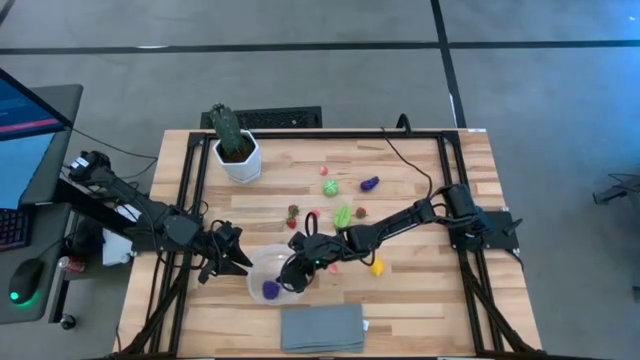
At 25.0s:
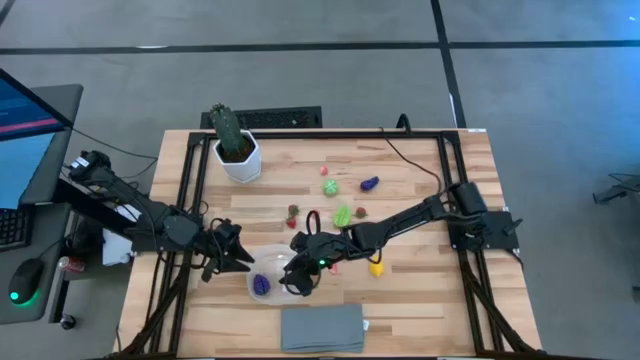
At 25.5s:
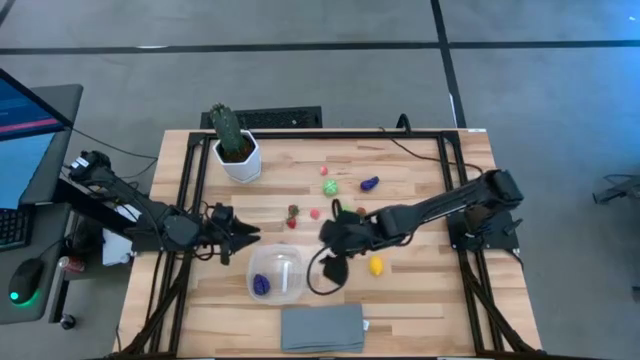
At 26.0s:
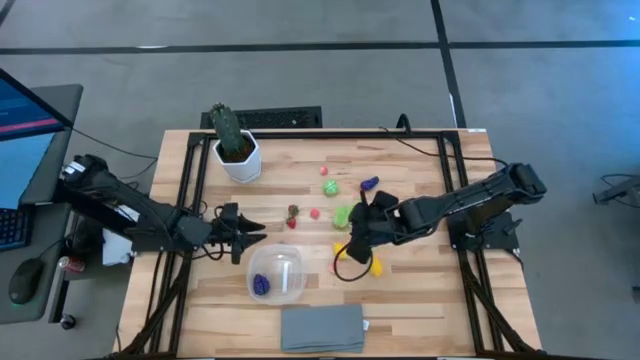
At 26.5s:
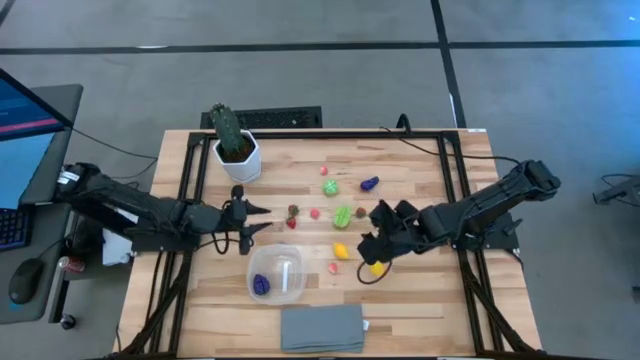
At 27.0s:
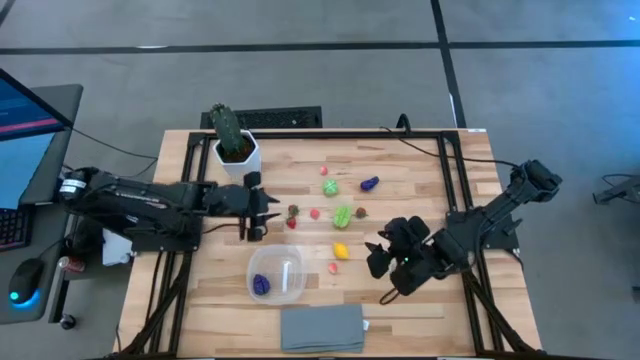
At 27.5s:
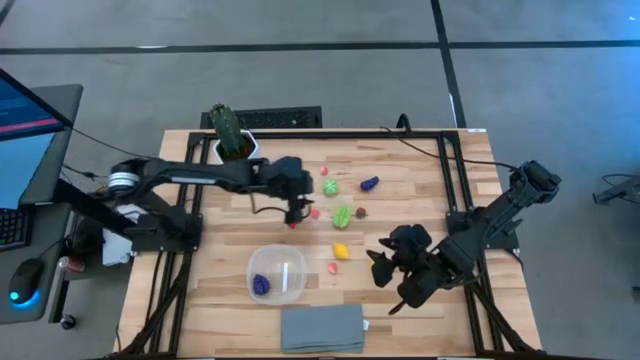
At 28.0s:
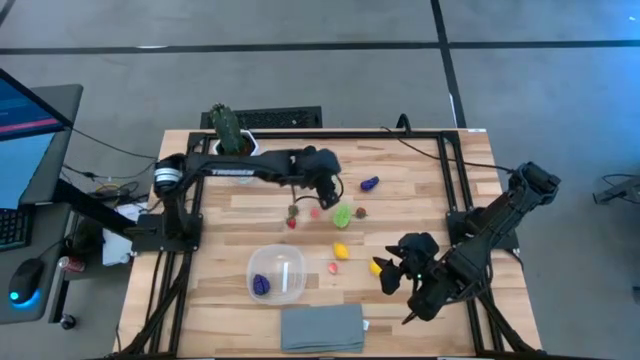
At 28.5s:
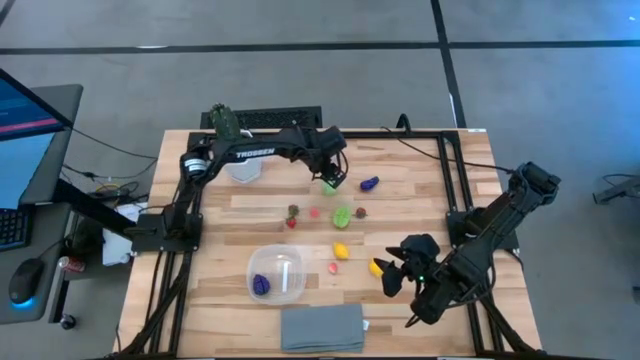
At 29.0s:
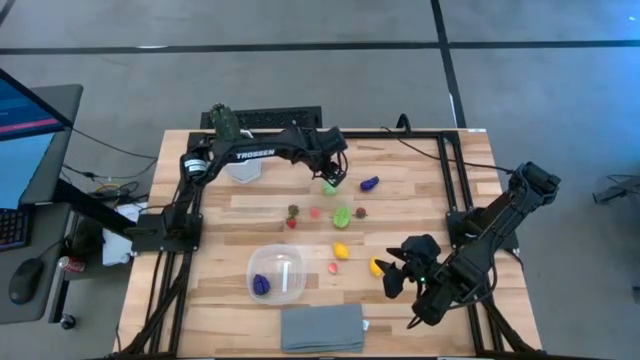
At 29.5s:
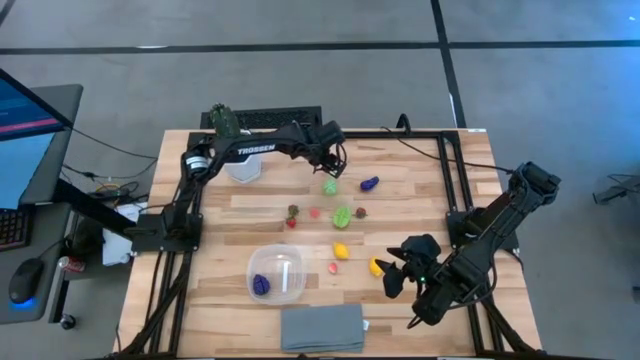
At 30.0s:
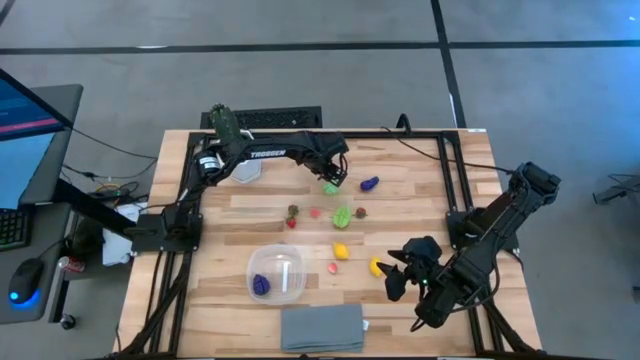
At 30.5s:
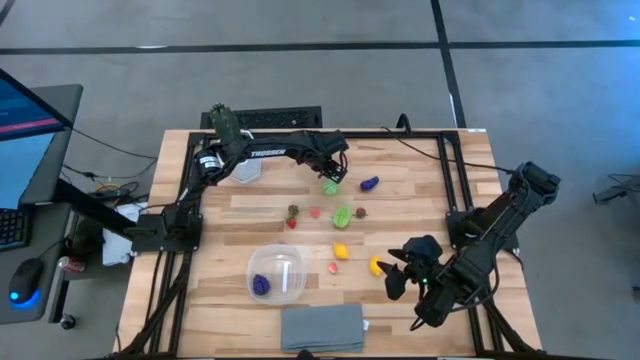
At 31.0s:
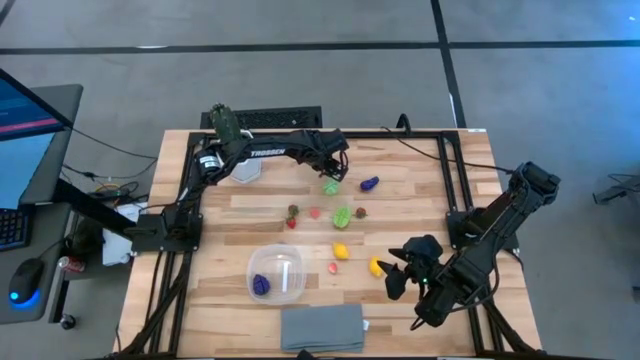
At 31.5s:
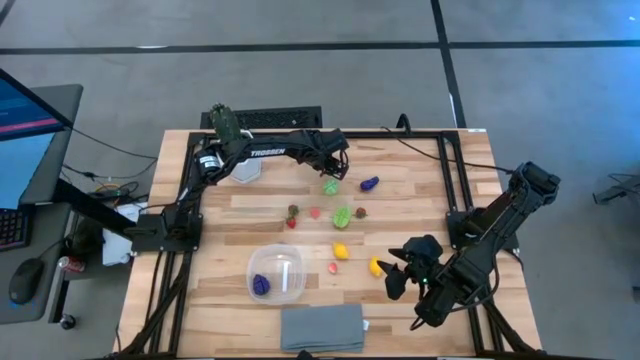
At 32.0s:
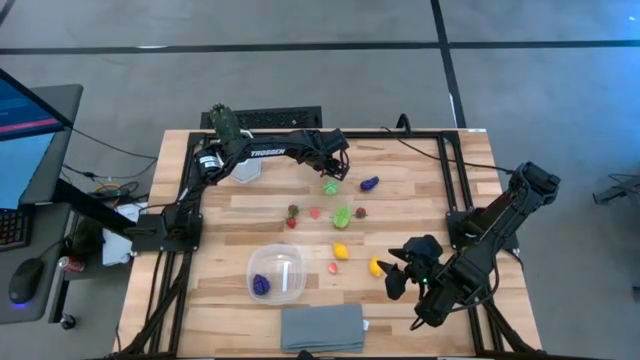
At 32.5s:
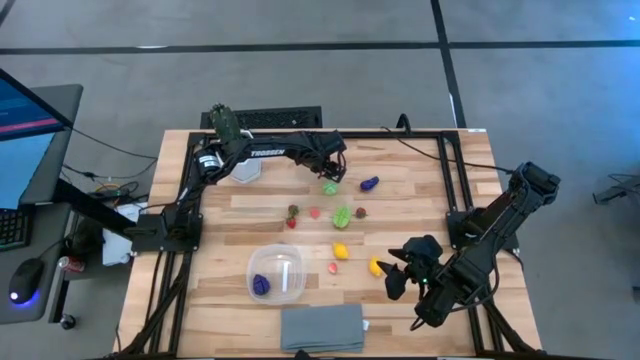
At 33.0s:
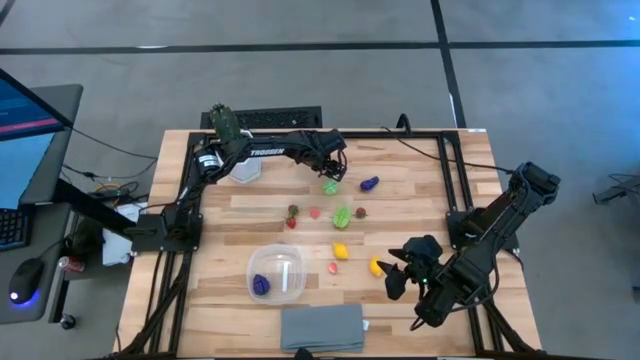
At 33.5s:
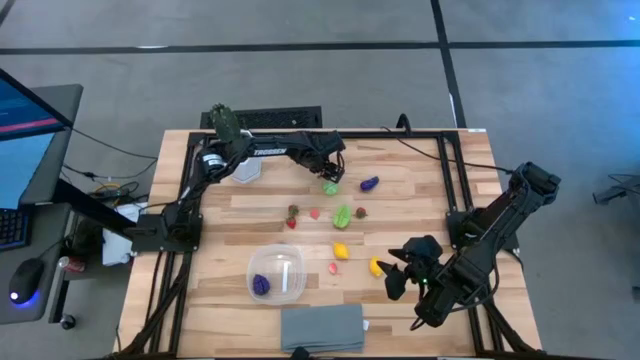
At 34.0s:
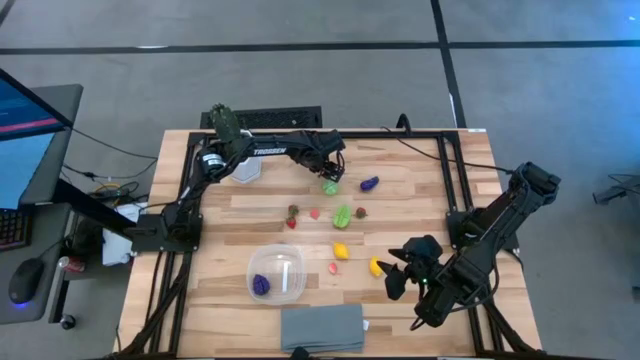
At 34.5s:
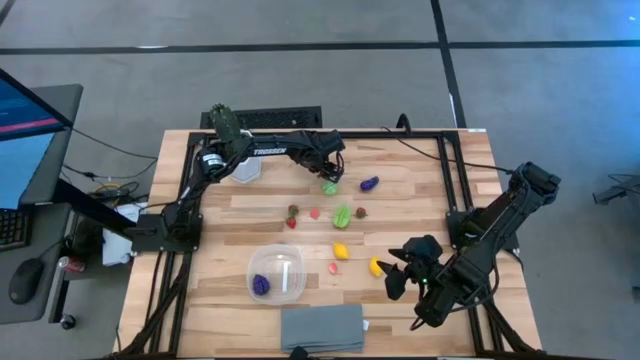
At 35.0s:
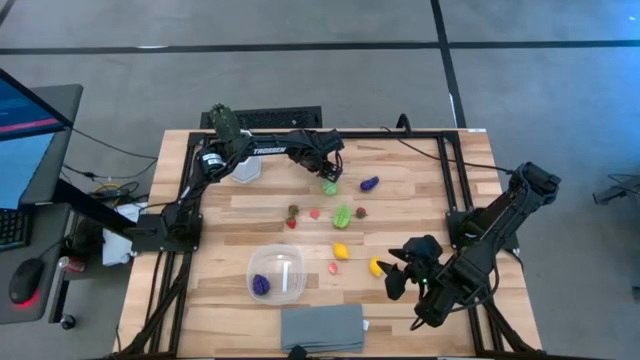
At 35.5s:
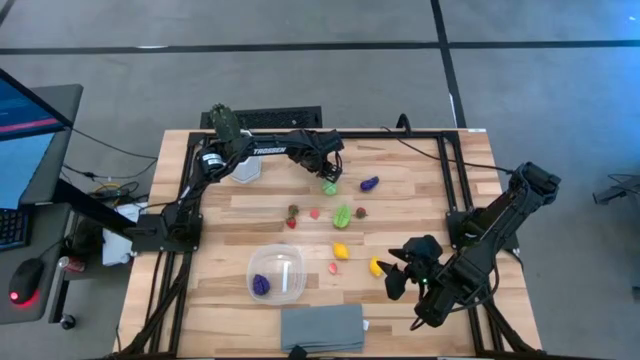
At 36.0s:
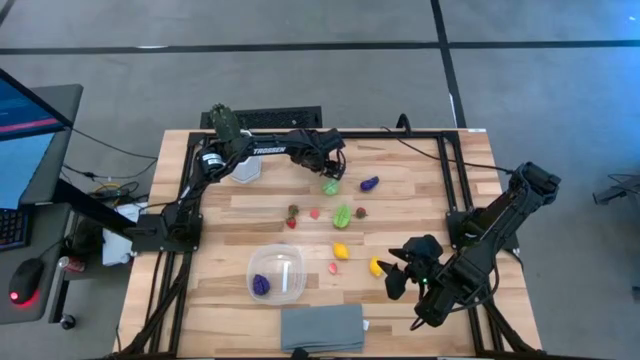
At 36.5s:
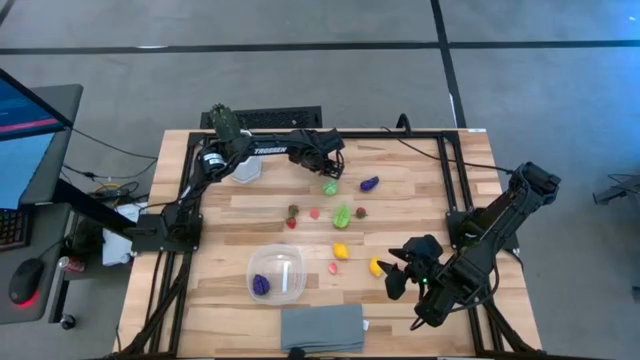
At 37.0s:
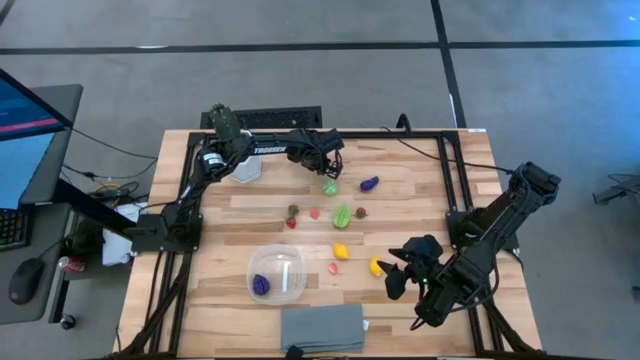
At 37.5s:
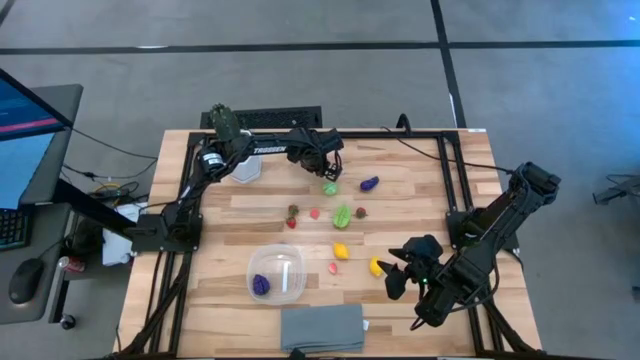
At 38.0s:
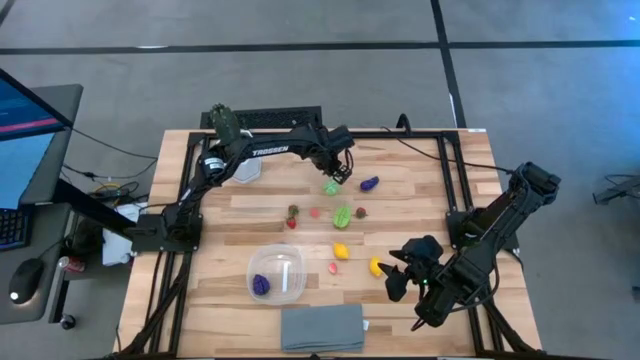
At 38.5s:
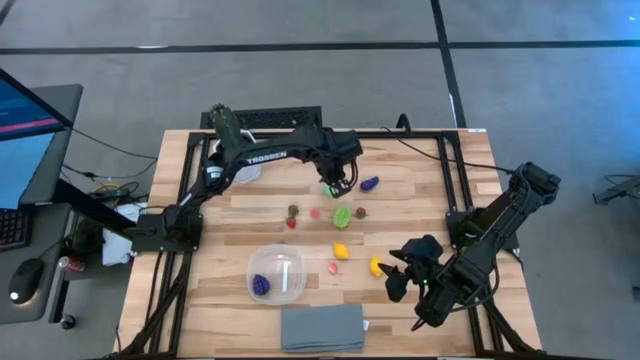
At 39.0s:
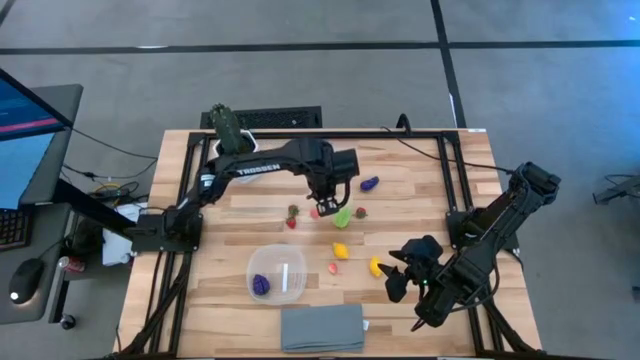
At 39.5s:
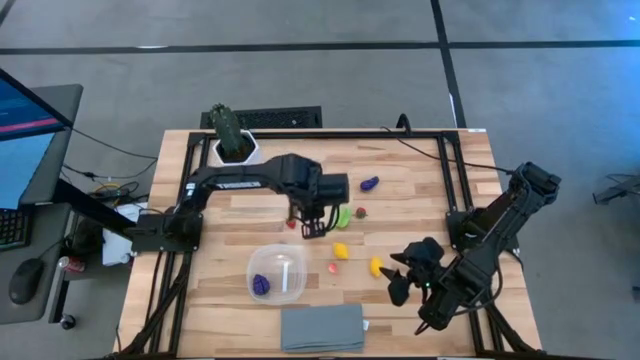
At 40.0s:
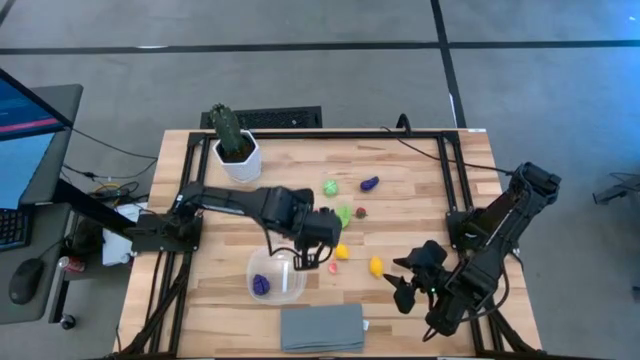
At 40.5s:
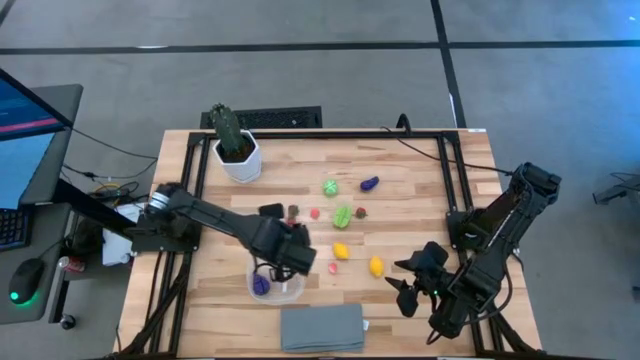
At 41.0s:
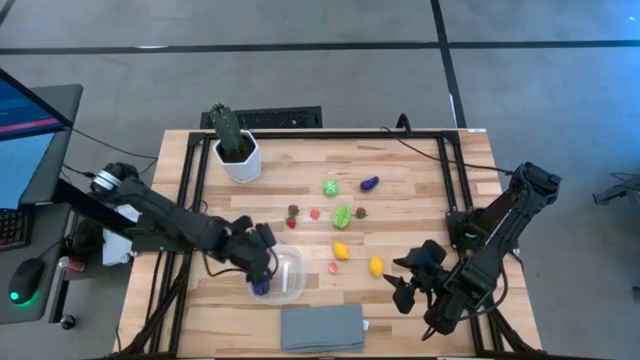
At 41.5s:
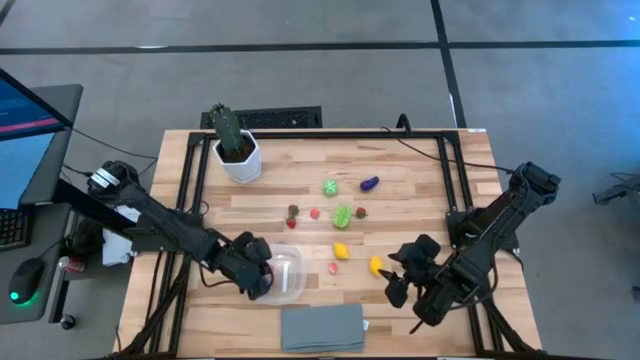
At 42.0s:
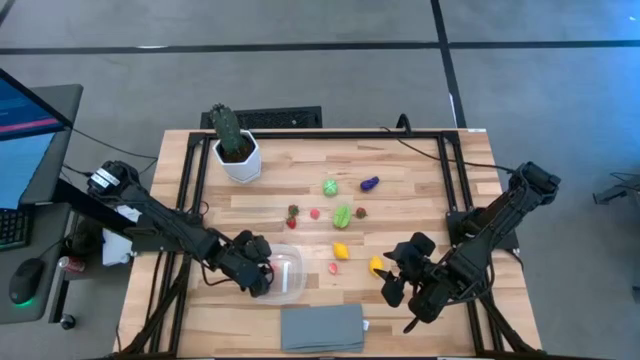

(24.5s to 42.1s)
Task: Pick and placing Produce into tupperware
Put the top peach into the transparent bin

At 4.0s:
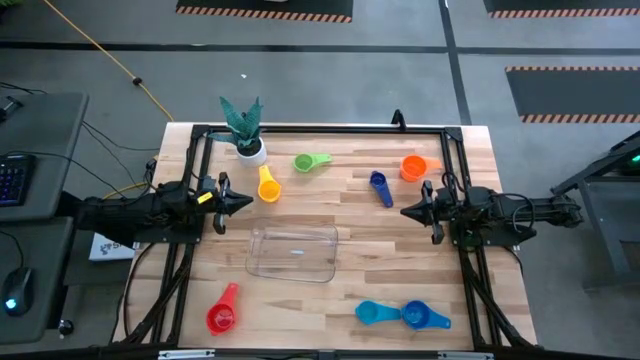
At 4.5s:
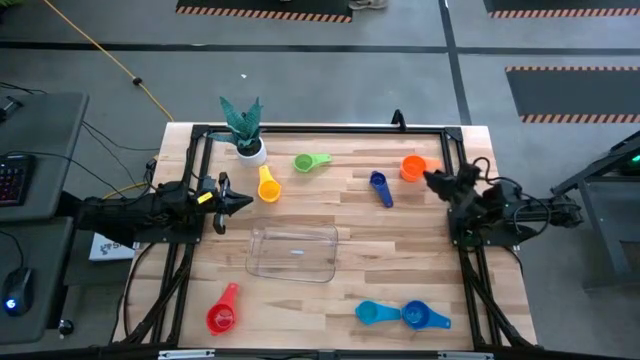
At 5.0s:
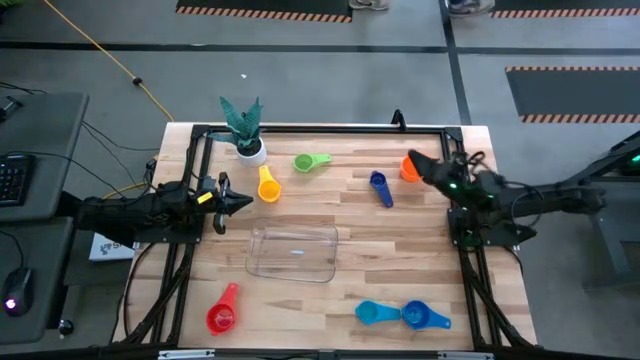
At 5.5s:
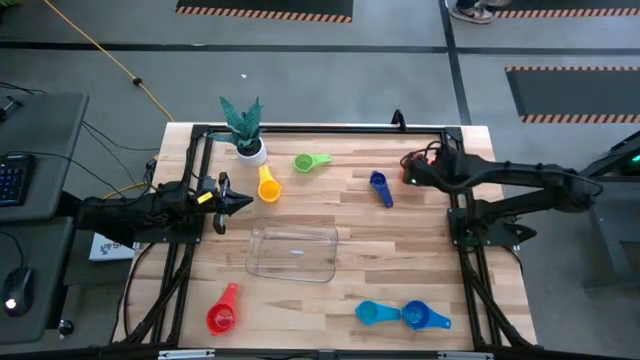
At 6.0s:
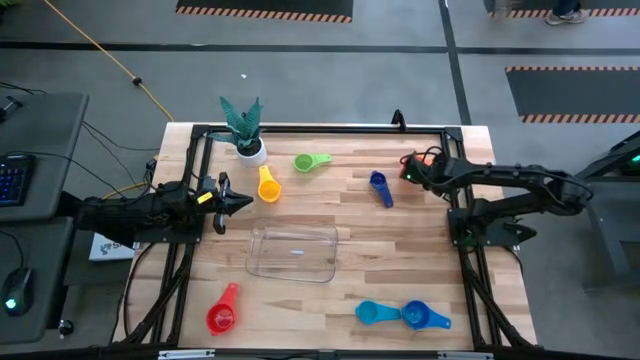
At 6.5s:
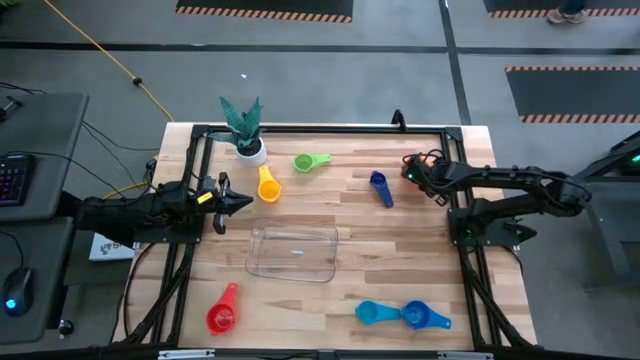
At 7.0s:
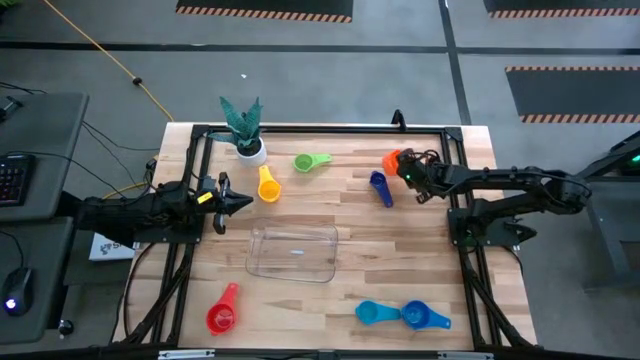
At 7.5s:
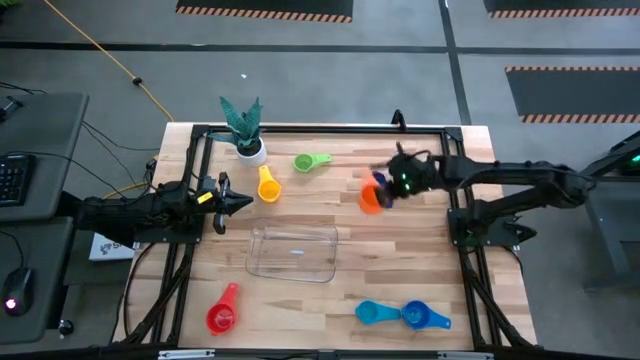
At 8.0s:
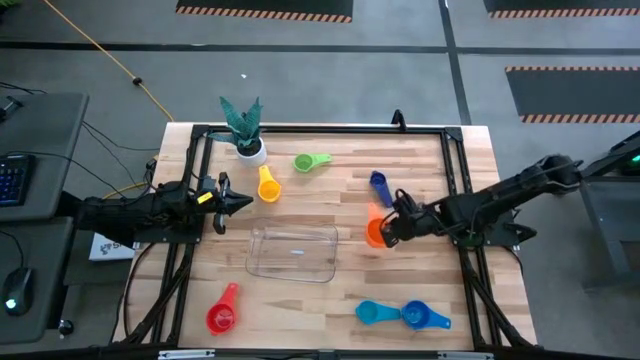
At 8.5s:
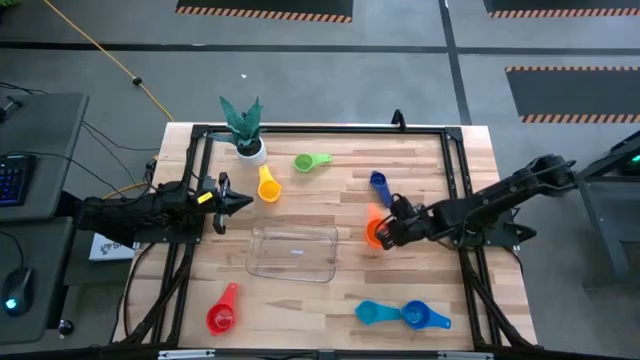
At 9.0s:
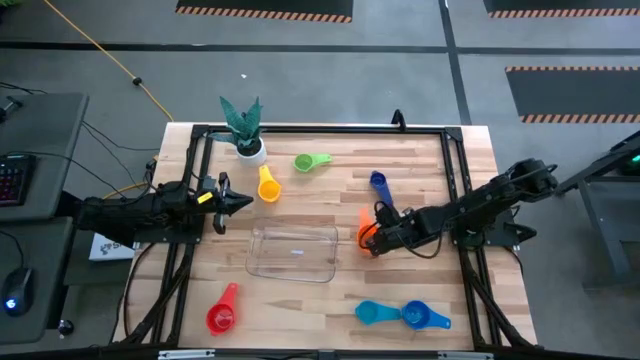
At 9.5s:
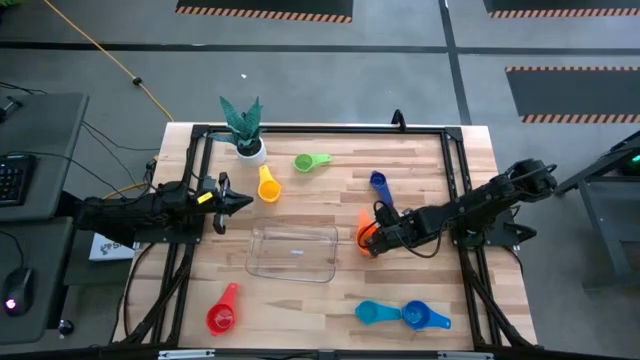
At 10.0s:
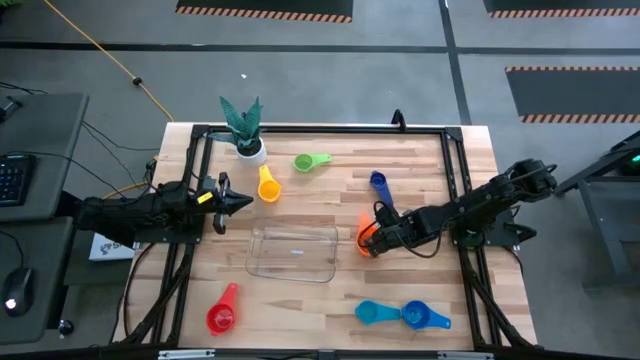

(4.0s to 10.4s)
Task: Nest measuring cups in basket
Move the orange measuring cup to the middle right of the table
